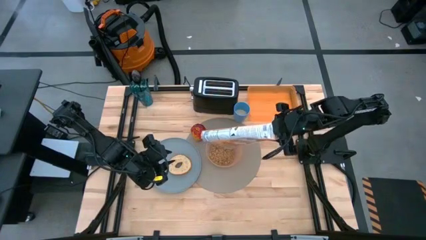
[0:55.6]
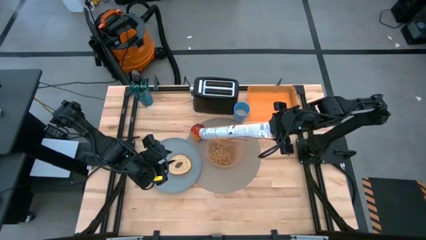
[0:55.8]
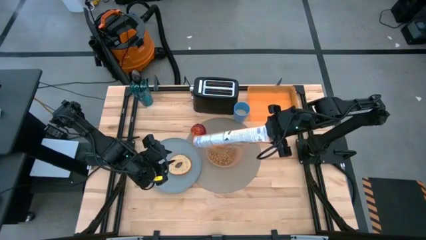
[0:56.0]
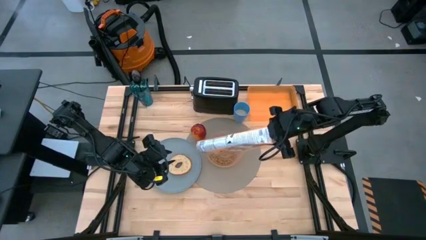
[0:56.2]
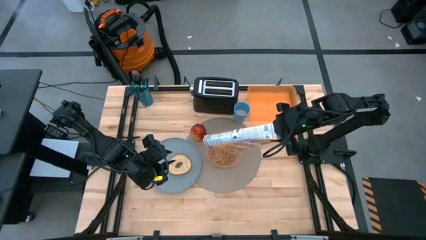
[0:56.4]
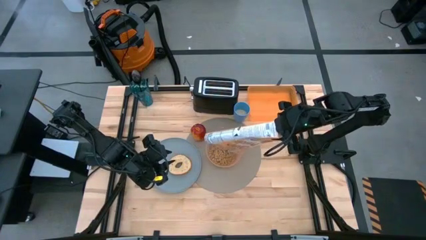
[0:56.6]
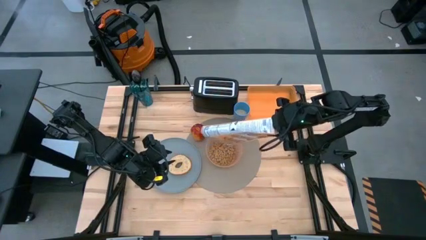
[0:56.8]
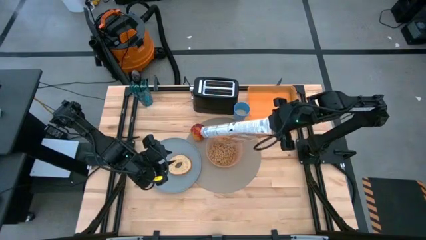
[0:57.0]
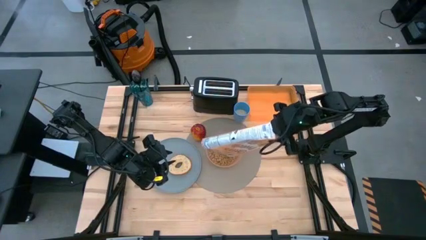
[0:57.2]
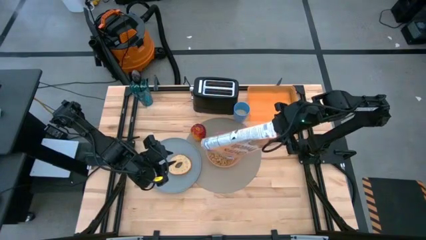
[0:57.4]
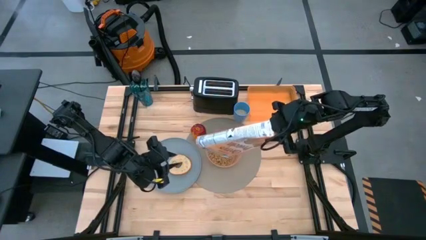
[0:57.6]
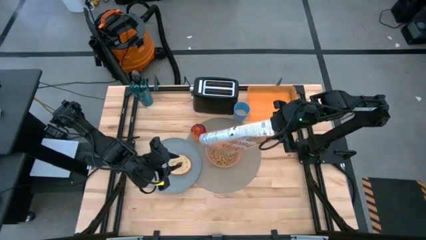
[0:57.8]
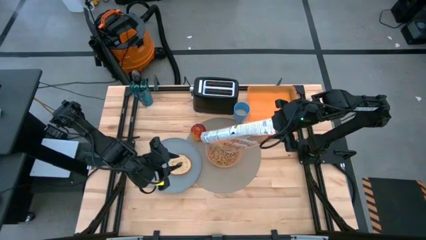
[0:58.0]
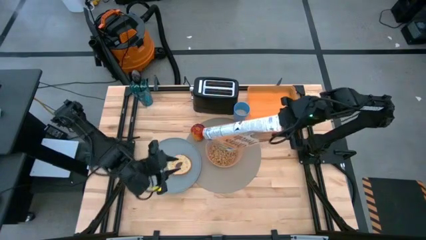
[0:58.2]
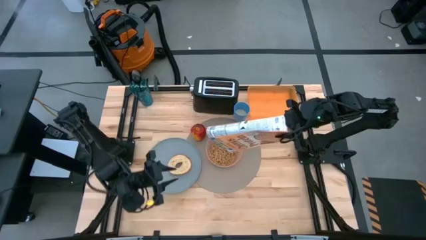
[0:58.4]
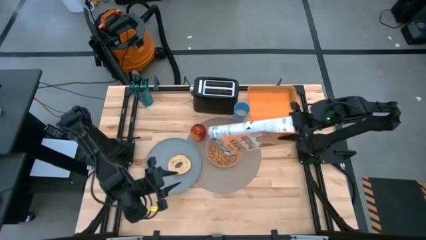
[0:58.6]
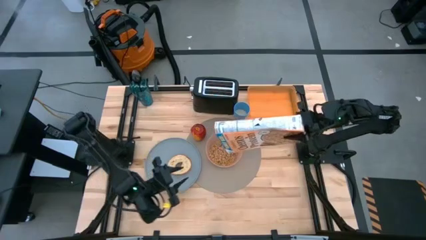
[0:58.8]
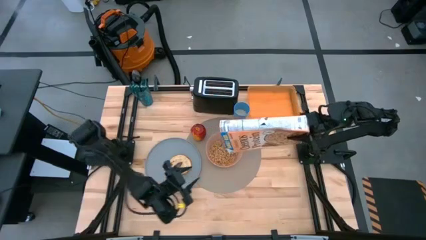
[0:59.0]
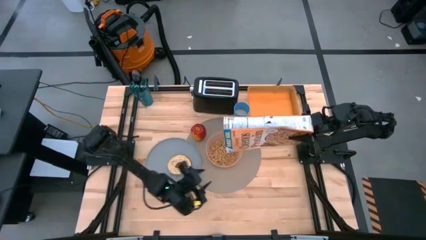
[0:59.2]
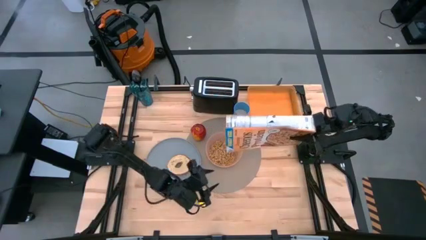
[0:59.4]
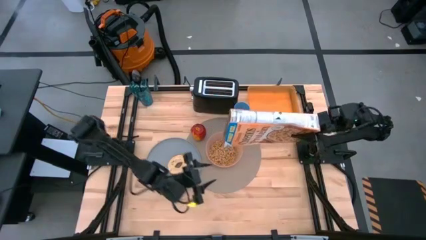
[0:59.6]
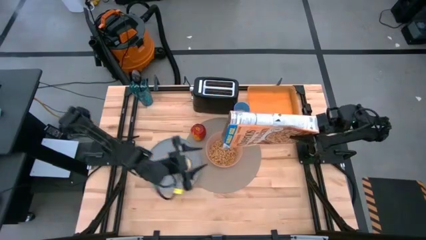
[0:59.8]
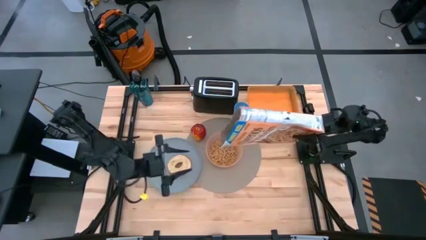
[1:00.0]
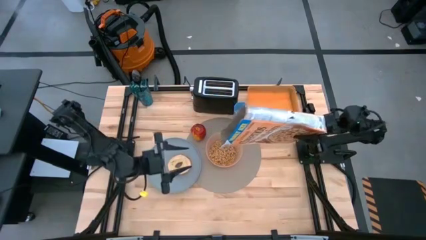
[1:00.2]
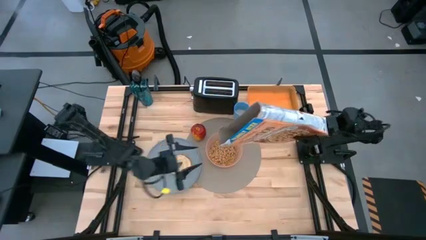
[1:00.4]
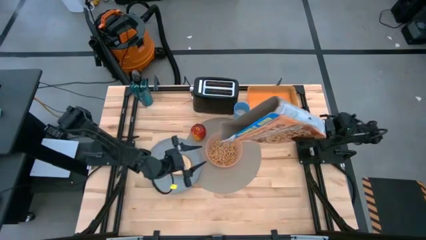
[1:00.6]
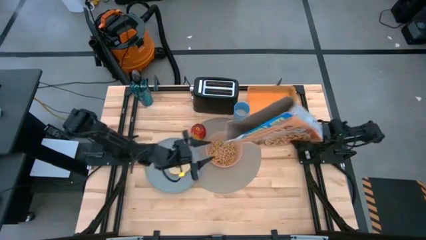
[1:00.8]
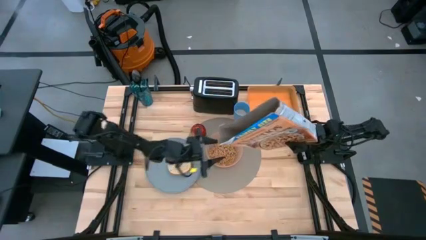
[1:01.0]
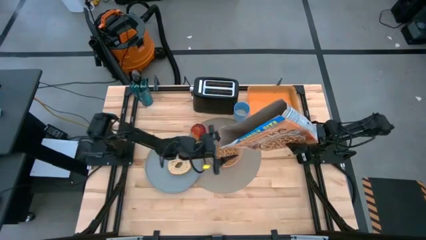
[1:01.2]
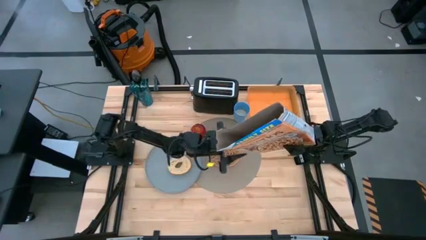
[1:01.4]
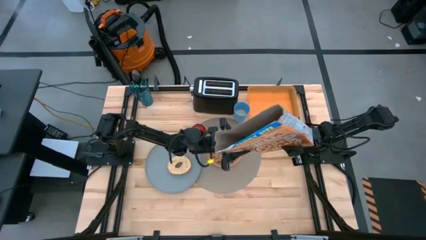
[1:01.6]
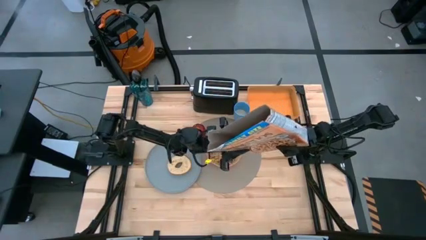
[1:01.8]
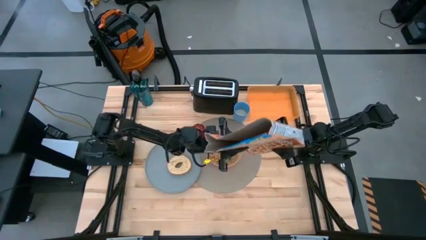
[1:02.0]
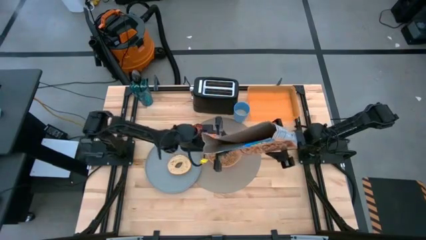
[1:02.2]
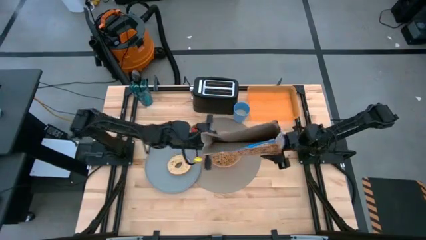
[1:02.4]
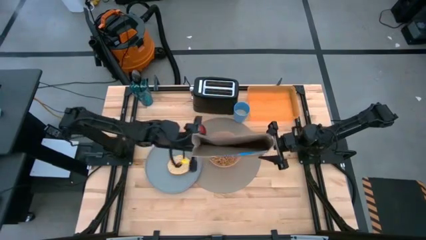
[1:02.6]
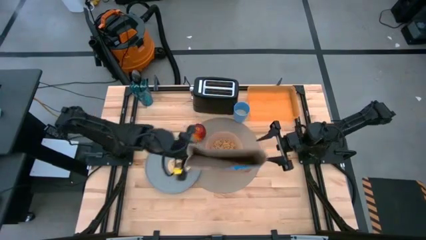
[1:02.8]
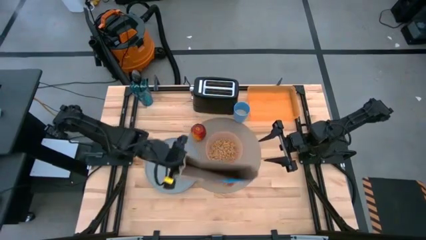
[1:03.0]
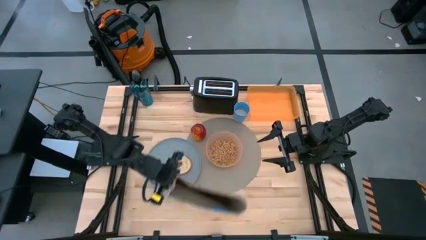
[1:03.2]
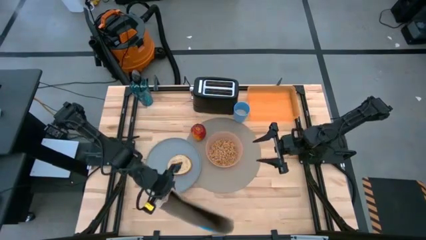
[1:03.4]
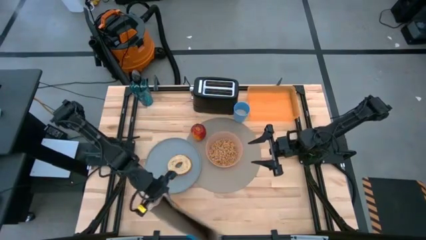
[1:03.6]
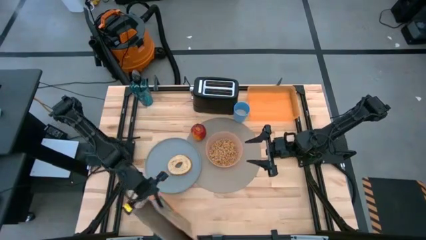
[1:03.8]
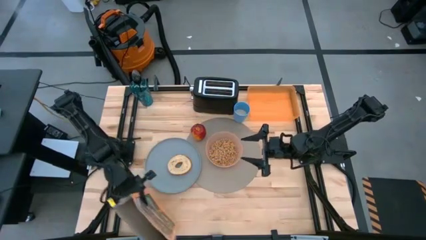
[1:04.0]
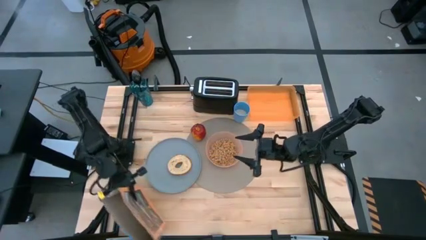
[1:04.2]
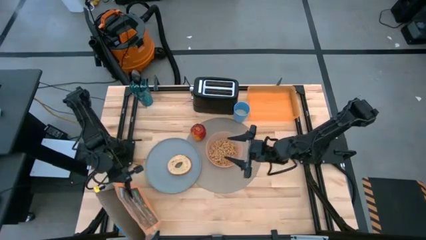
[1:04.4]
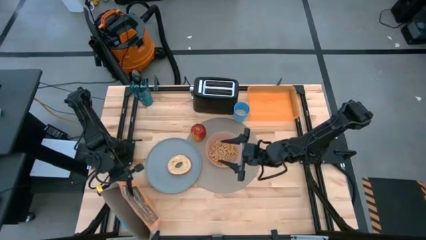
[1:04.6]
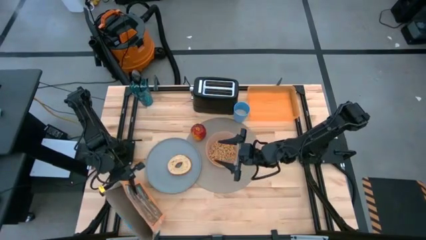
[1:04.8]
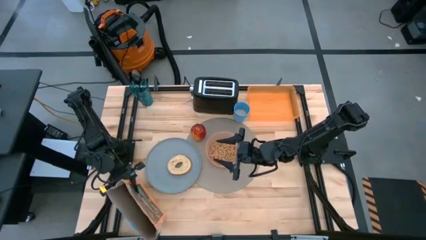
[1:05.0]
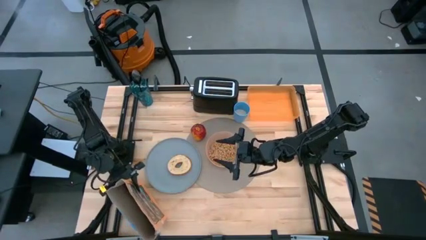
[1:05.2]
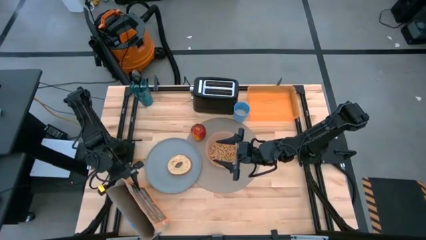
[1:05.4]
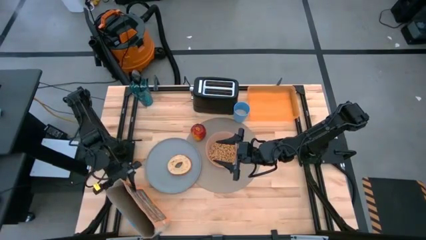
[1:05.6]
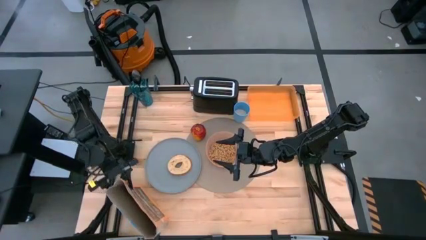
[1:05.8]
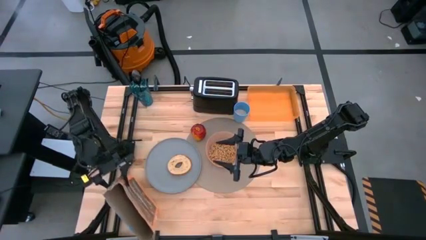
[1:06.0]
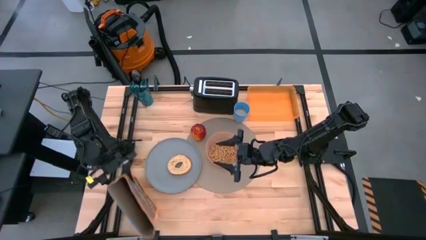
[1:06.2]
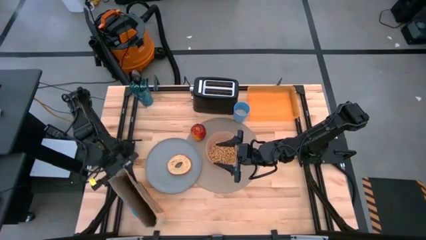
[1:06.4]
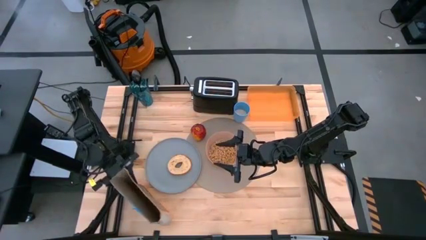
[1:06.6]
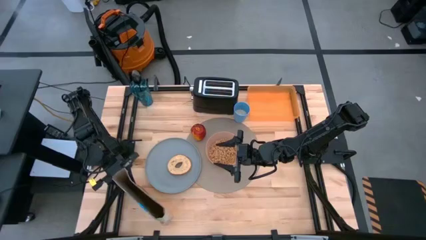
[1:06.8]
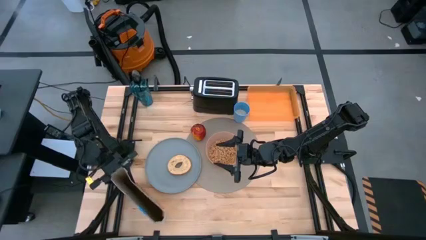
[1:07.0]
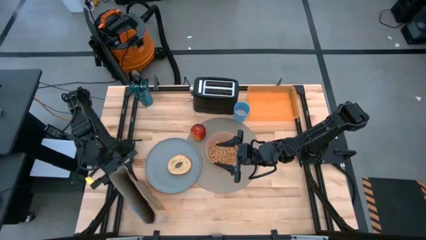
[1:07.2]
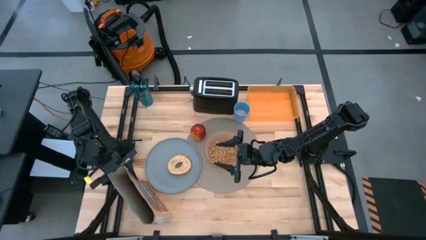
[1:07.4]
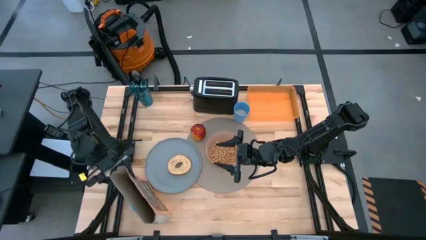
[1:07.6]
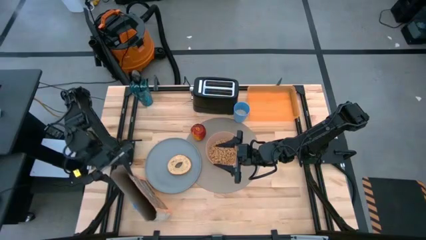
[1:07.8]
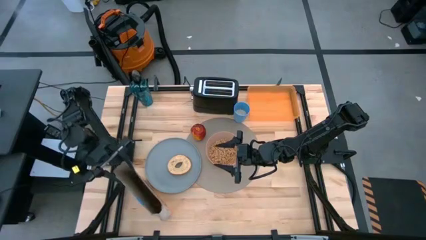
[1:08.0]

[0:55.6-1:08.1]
Task: Arrange a breakfast setting
Pour the cereal from the cereal box into the orange bowl
